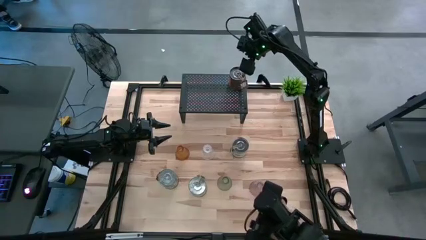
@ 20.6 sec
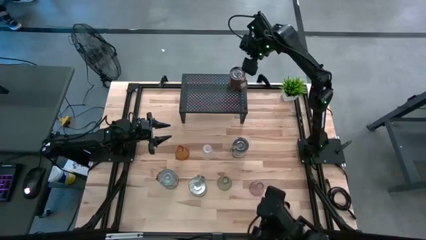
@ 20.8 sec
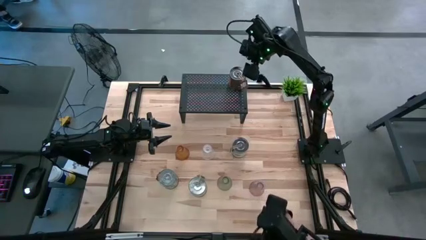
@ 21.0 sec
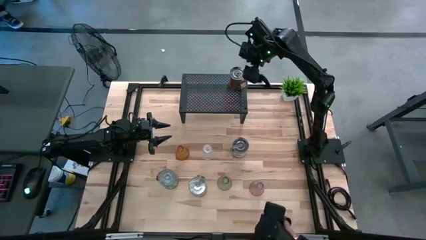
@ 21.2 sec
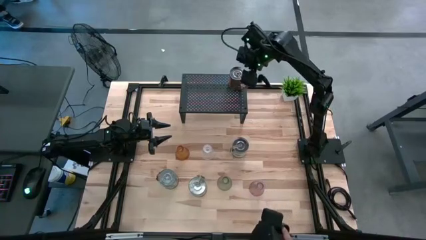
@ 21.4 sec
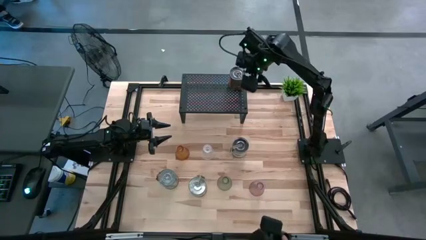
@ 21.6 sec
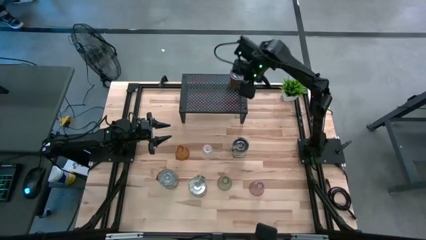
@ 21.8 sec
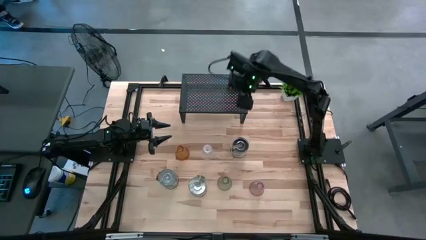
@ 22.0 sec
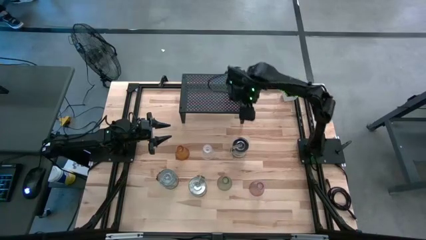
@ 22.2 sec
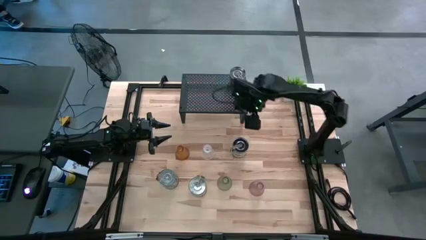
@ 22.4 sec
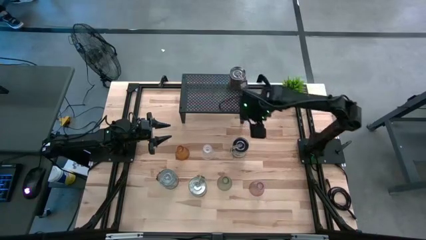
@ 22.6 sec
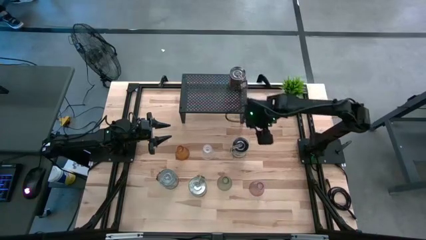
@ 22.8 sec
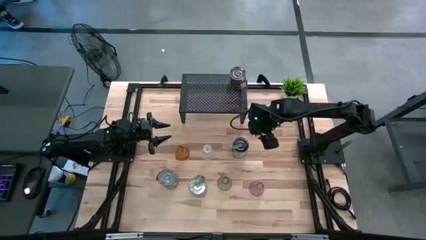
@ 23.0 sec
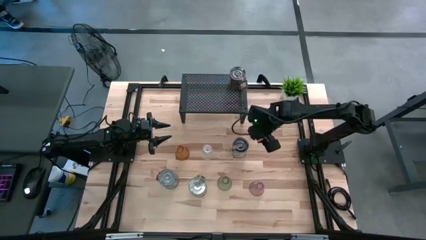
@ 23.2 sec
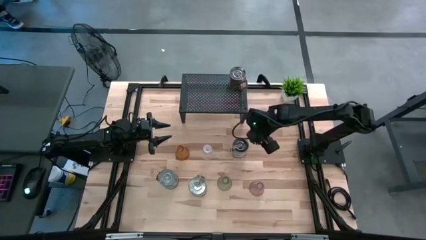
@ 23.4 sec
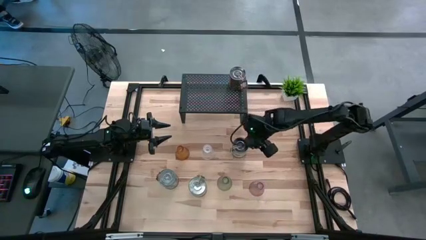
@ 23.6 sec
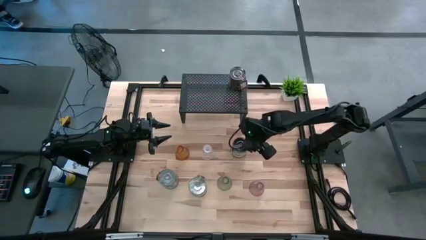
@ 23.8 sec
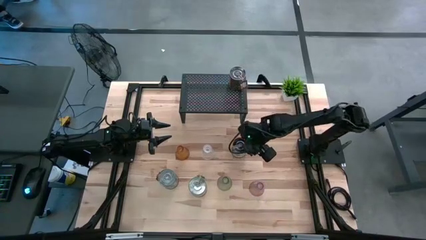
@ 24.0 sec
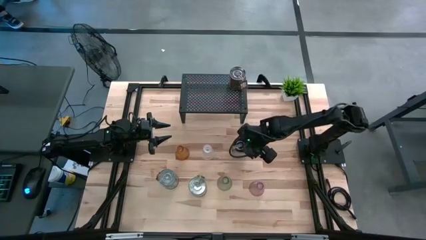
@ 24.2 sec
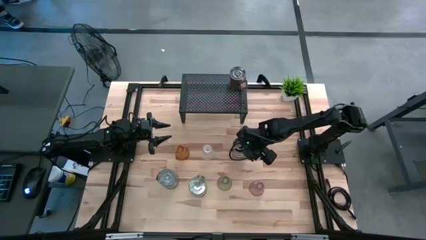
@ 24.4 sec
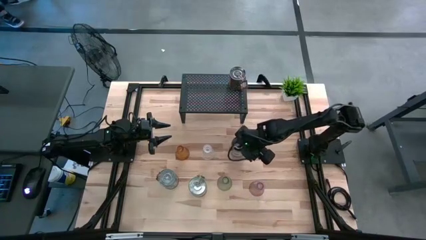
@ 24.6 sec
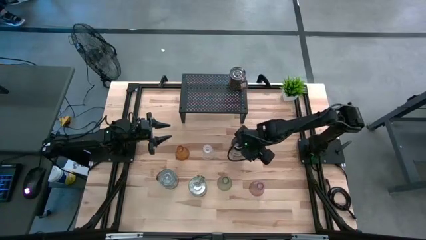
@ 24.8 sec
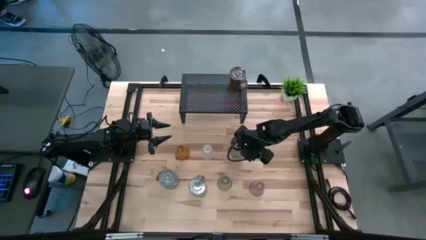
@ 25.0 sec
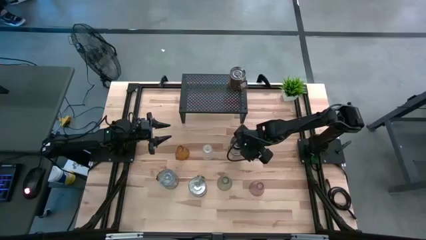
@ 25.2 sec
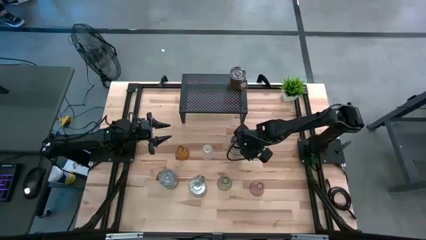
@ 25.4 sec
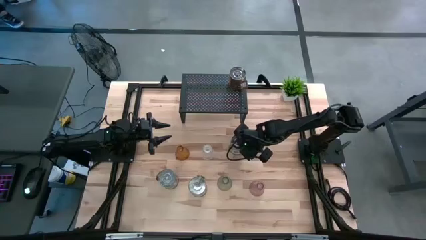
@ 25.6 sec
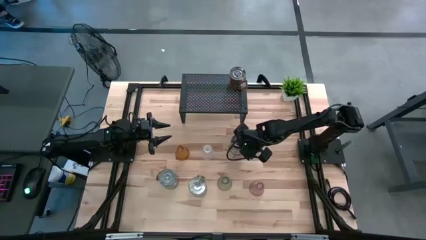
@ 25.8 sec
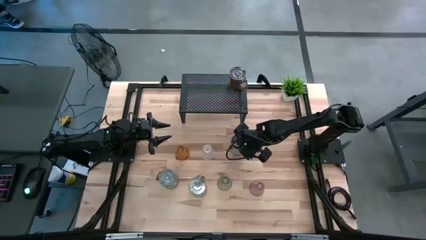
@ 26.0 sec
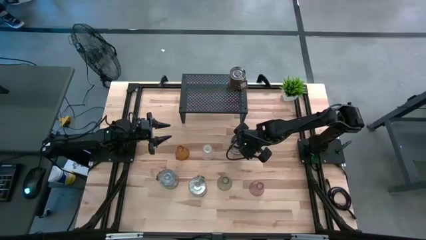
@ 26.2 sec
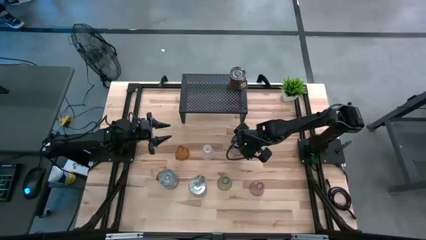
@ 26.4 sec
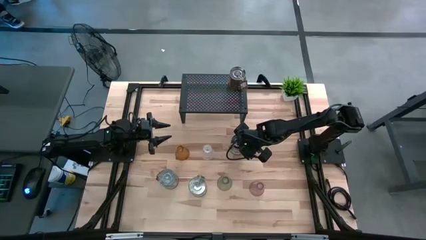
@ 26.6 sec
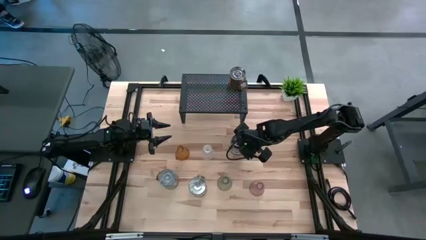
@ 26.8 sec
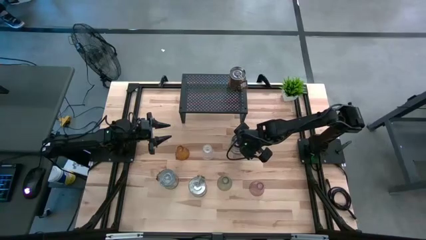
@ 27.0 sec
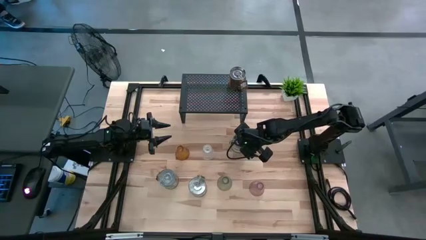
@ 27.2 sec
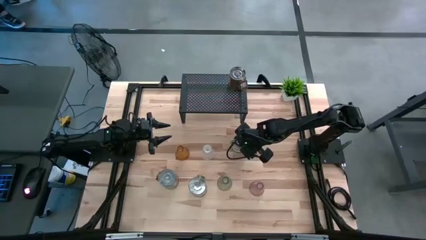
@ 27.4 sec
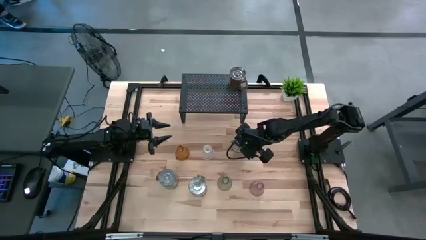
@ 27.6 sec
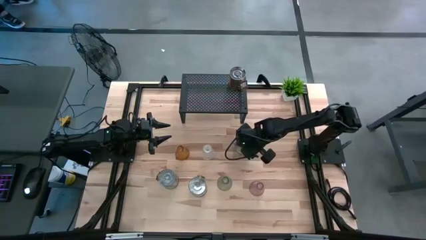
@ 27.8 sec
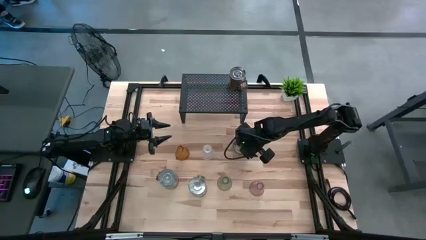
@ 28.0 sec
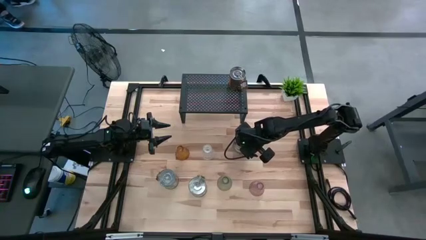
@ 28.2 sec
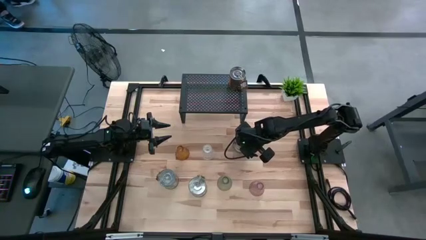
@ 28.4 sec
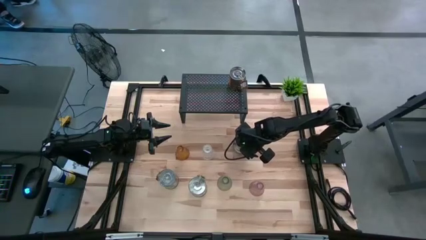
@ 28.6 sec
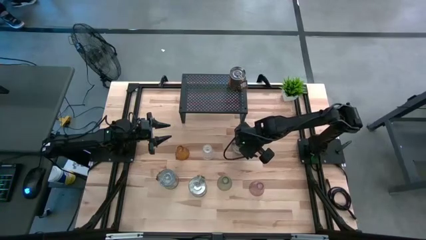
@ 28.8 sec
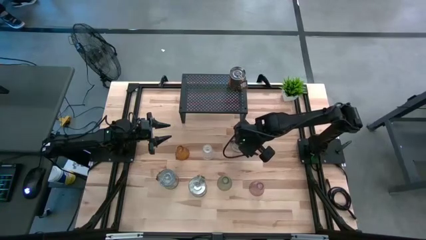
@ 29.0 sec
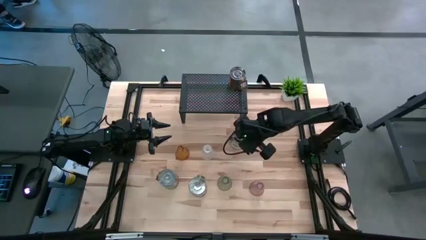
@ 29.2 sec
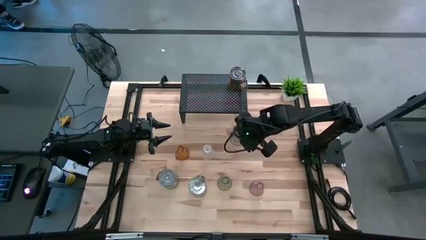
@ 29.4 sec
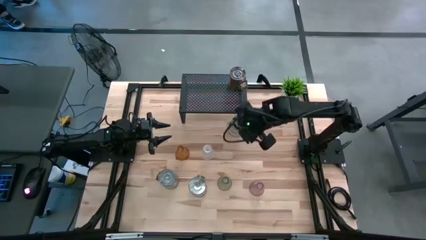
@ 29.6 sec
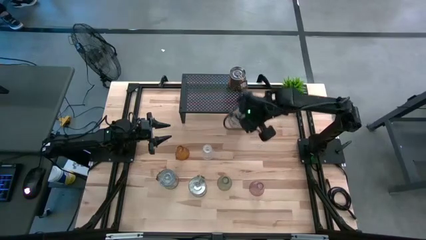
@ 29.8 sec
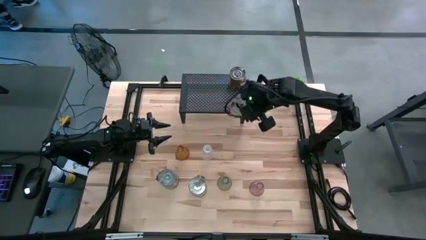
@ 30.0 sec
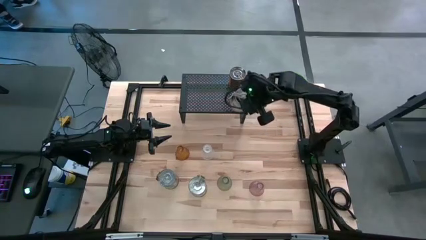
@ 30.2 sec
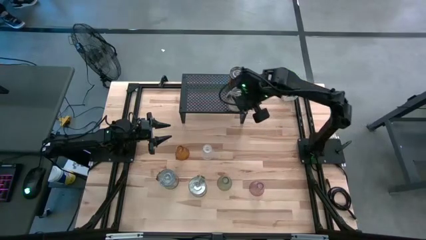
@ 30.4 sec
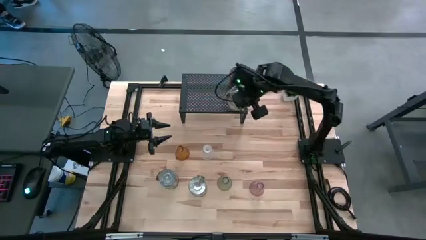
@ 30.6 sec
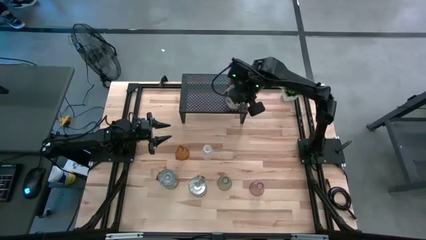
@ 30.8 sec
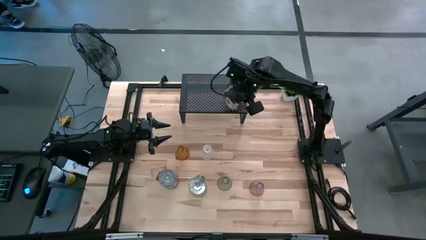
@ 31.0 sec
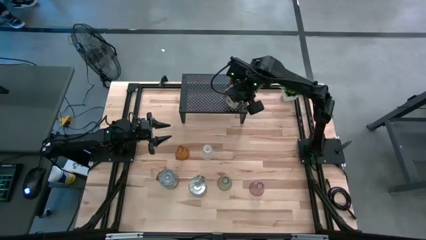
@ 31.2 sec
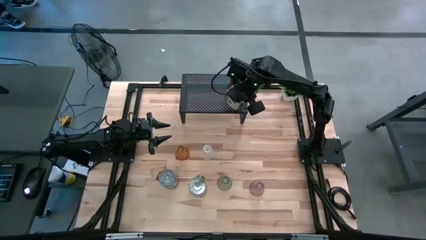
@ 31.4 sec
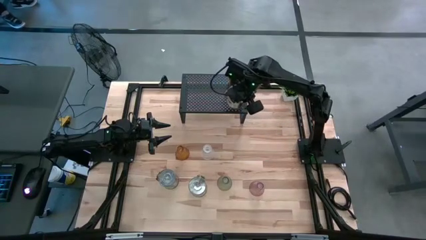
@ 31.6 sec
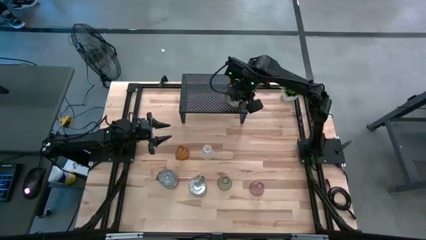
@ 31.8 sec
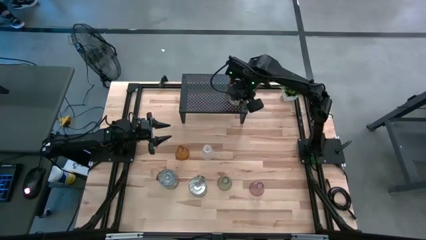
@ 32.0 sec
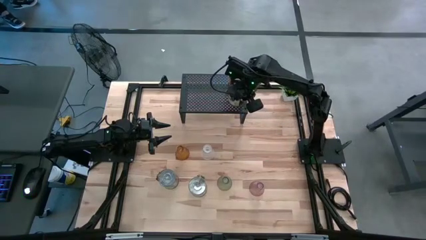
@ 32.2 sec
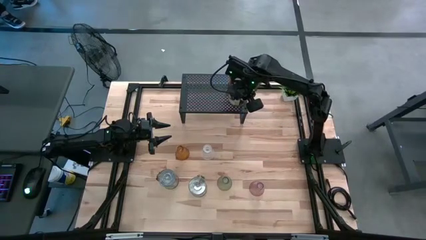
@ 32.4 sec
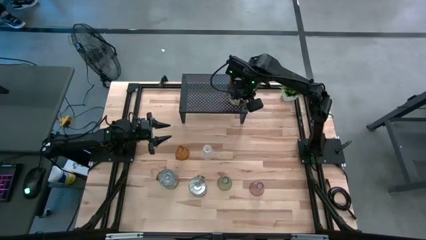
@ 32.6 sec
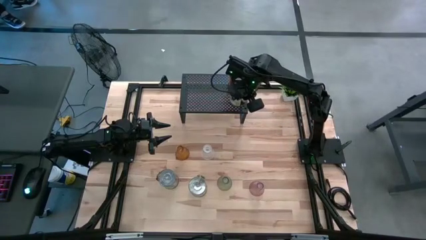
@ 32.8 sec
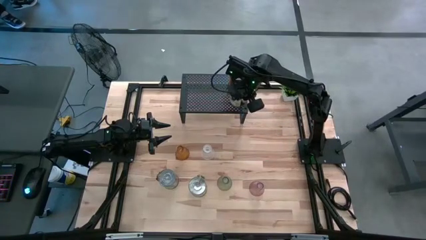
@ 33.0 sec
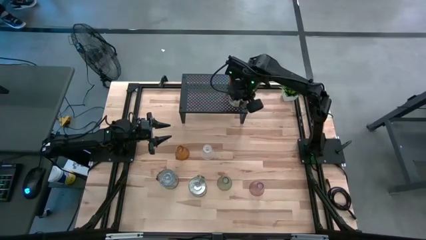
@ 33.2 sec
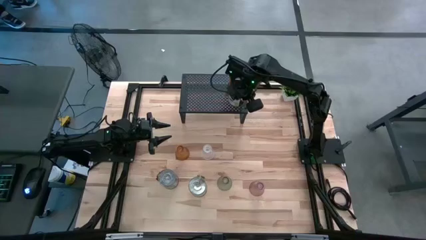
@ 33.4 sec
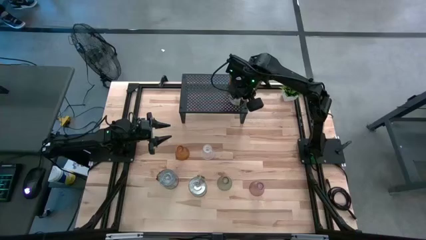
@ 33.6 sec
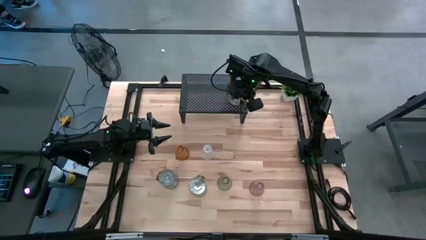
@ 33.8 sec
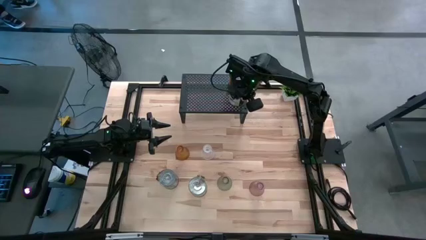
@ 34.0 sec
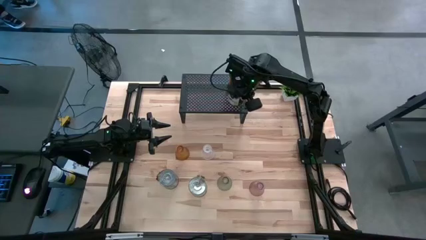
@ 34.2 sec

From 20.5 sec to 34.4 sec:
Task: Pick & Place candle stick holders
Put the top green scented candle on the shelf aligned with the other scented candle
